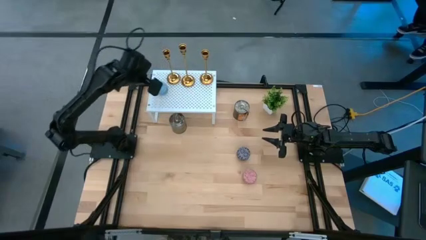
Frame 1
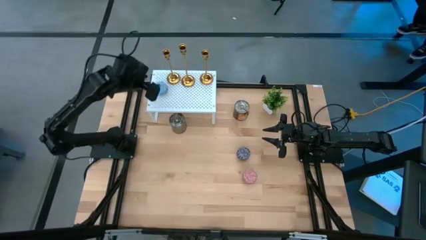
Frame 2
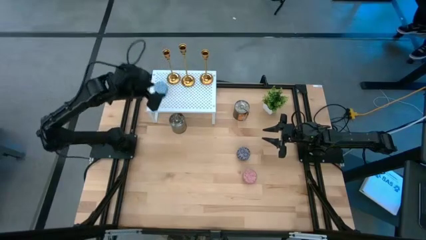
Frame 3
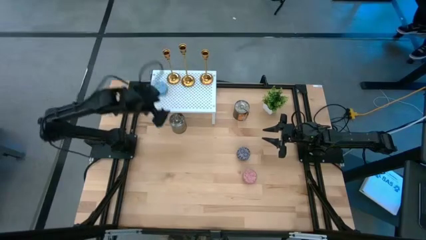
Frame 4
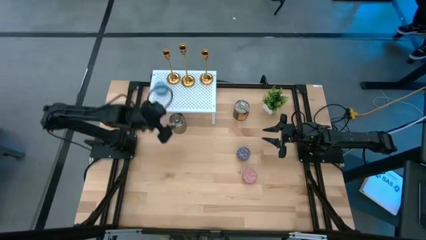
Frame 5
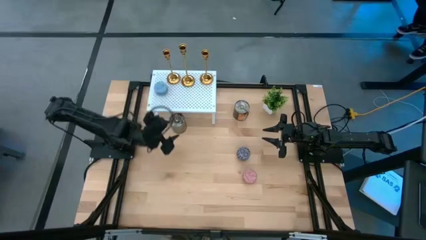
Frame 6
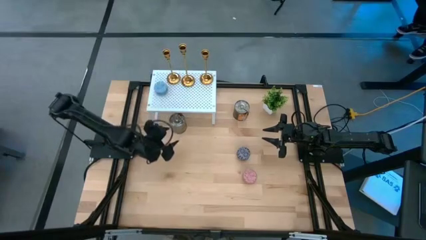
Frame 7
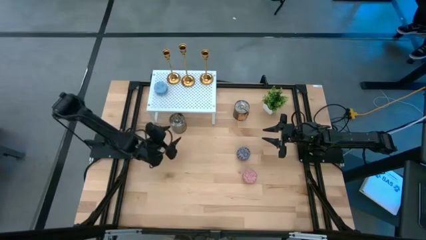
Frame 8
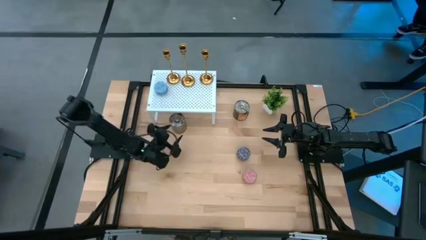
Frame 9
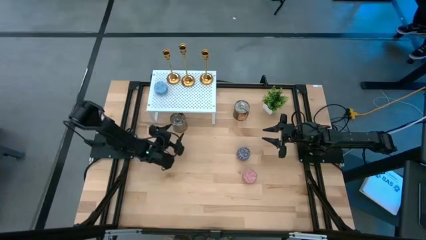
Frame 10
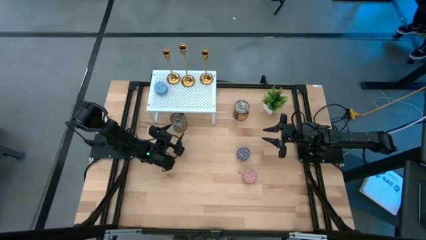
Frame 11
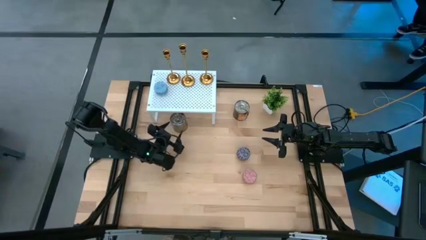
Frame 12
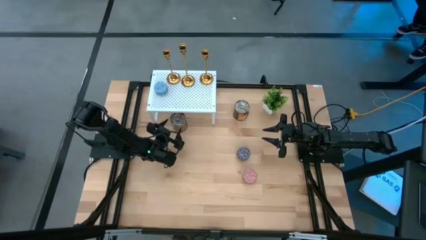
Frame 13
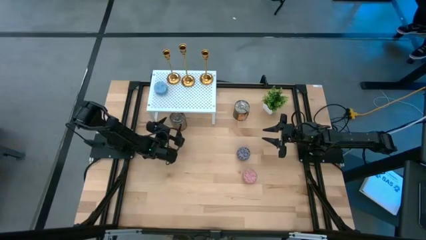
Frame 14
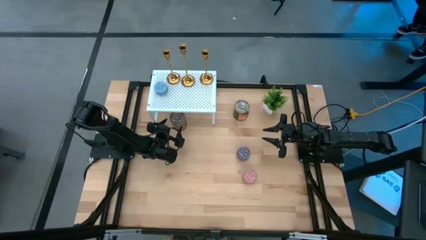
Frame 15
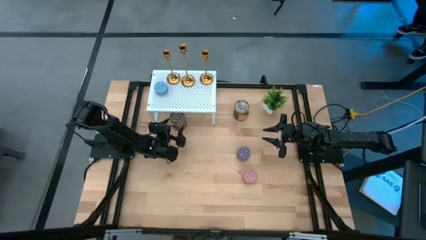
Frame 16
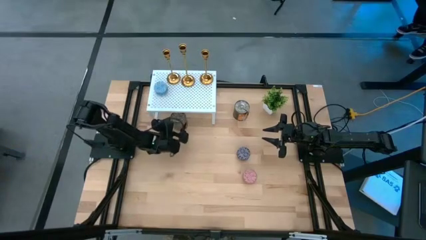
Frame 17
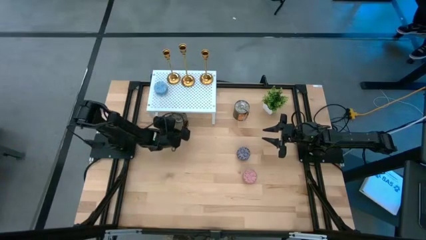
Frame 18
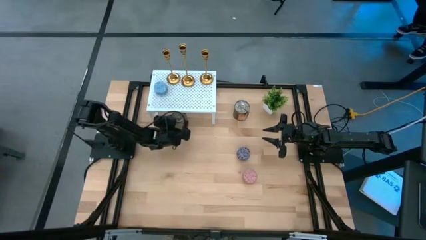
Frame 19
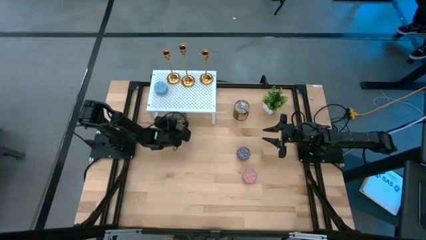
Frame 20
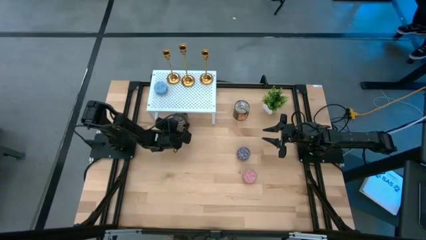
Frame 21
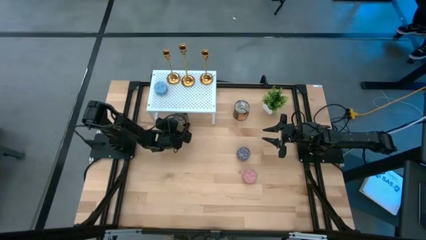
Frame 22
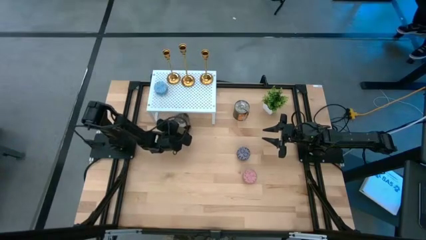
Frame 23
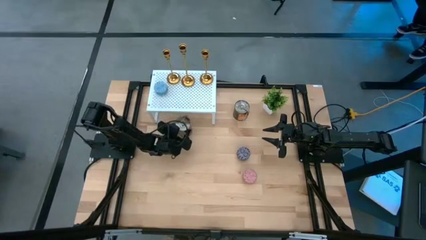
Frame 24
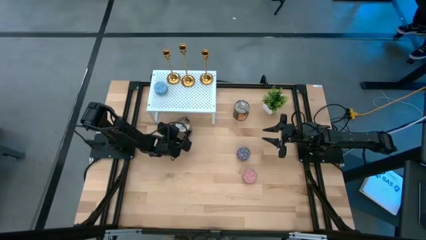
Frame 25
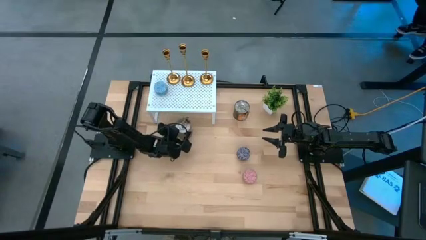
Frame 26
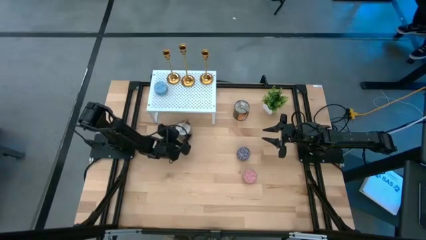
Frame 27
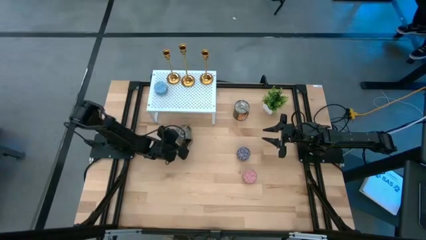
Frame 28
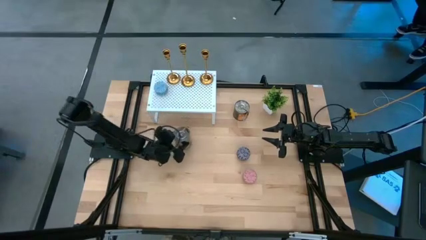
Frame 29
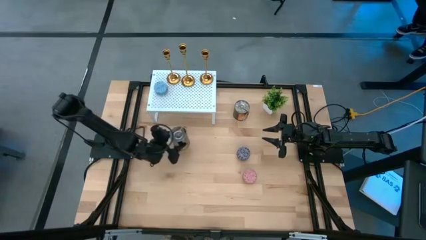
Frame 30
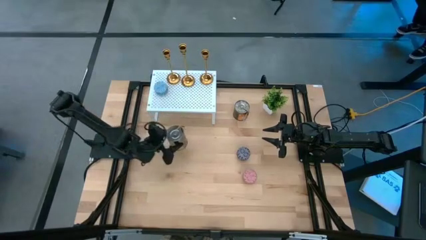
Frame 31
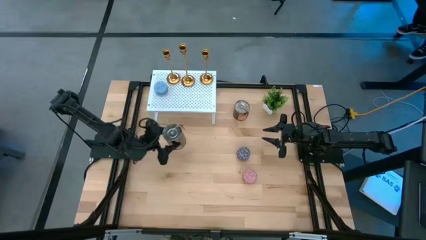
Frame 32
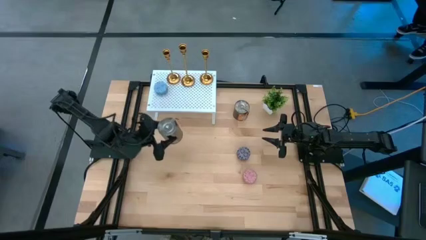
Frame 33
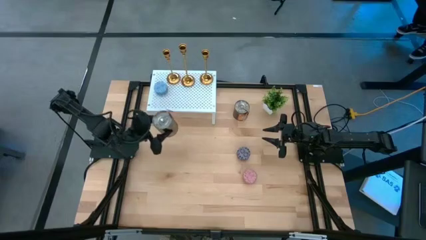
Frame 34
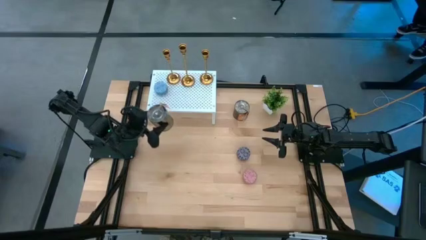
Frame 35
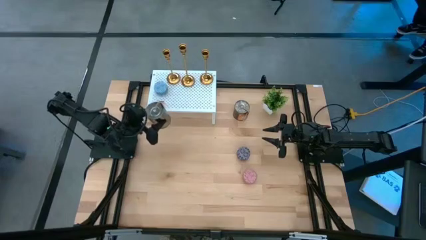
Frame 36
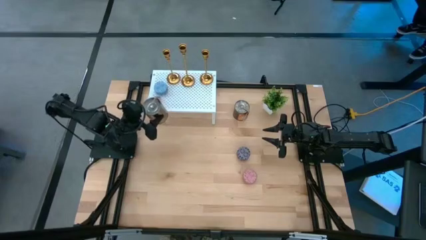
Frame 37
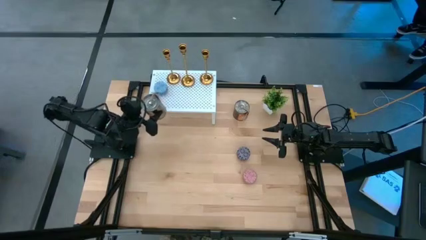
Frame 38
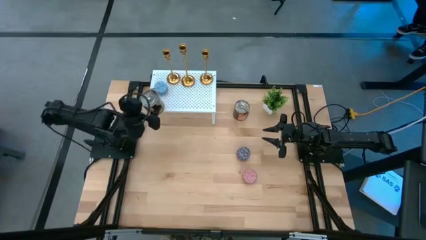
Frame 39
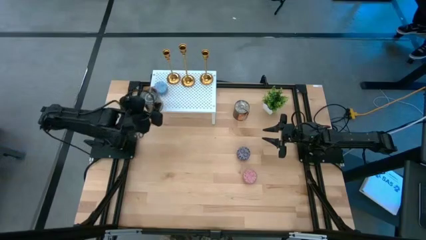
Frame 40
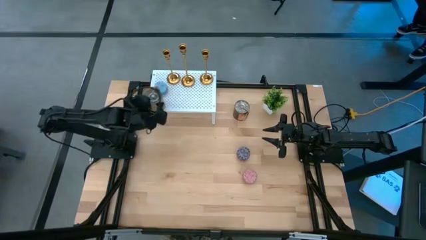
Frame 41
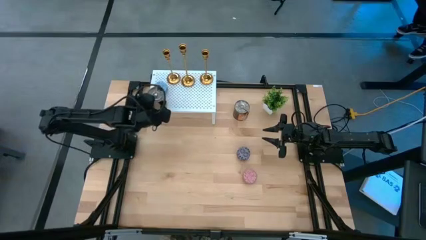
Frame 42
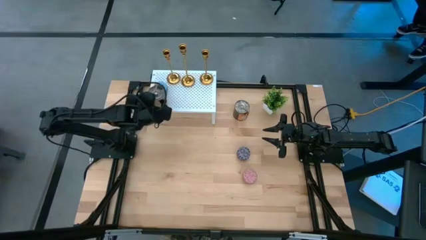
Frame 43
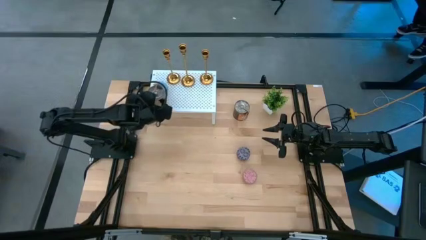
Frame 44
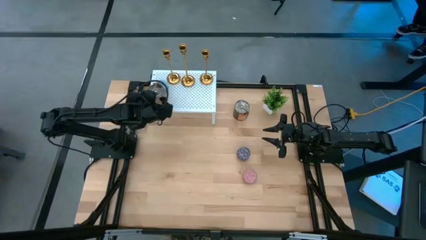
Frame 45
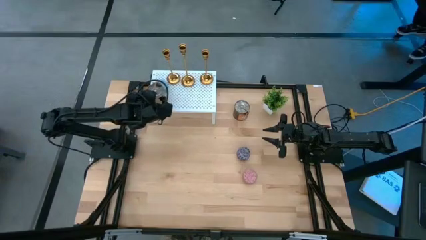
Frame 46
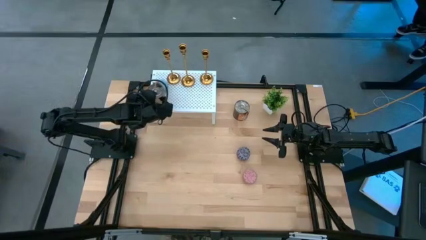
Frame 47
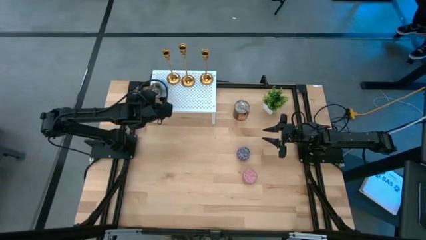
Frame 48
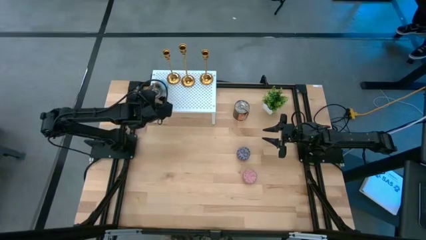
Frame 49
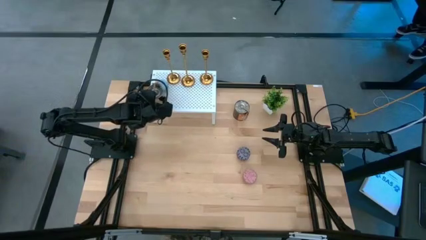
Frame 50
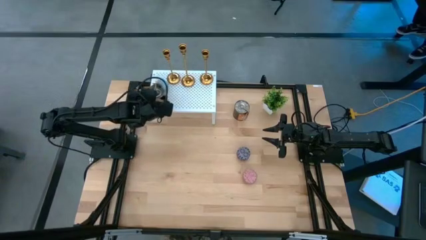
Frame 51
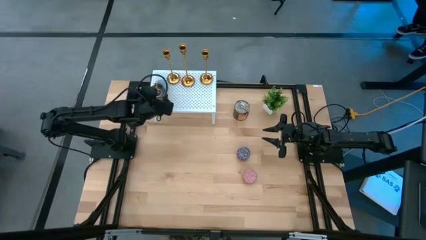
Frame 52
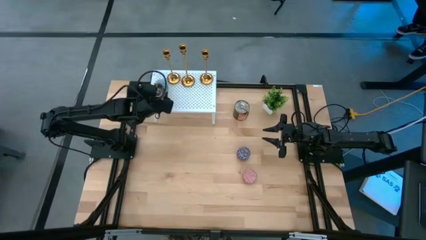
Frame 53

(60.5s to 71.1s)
Task: Pick & Place candle stick holders
Put the left candle tin on the shelf

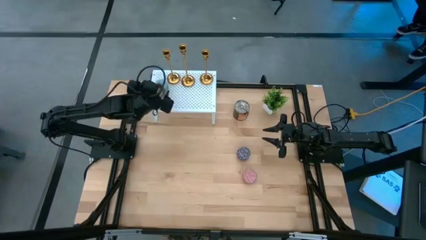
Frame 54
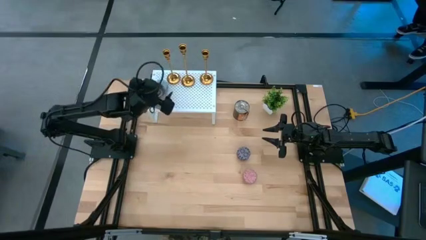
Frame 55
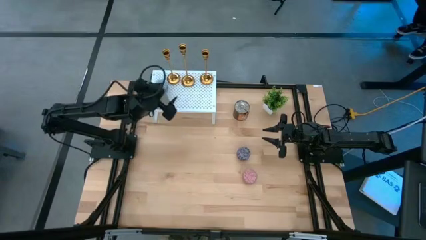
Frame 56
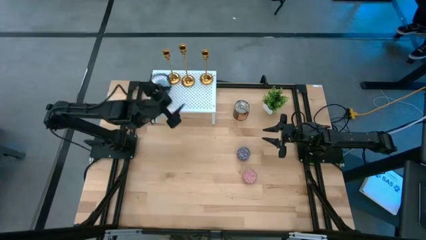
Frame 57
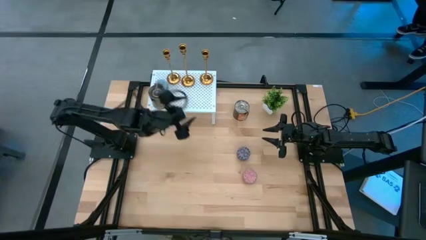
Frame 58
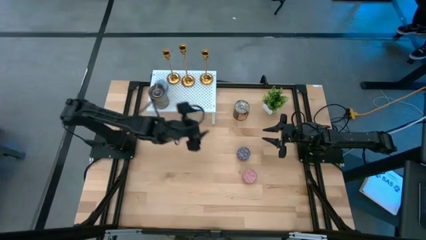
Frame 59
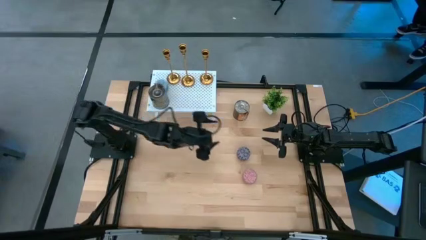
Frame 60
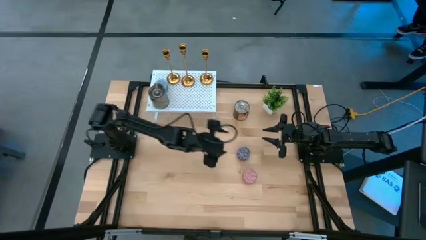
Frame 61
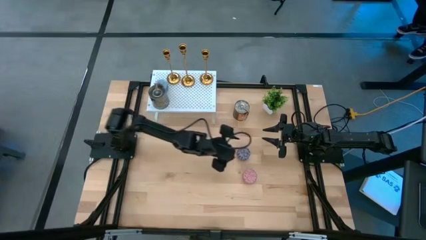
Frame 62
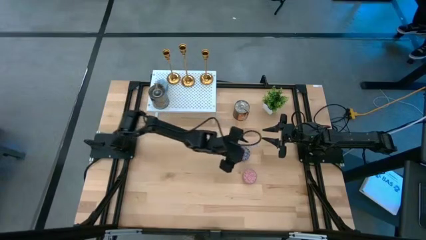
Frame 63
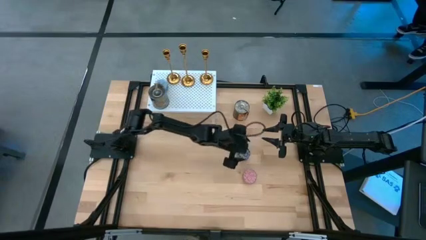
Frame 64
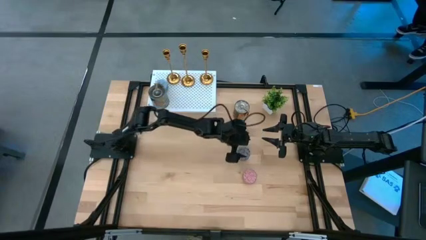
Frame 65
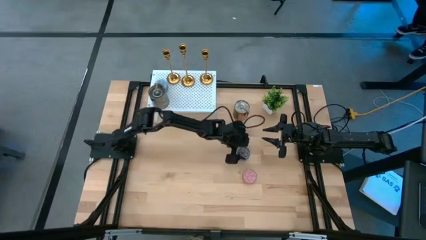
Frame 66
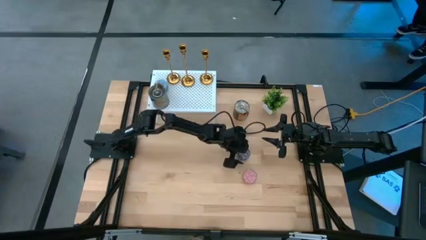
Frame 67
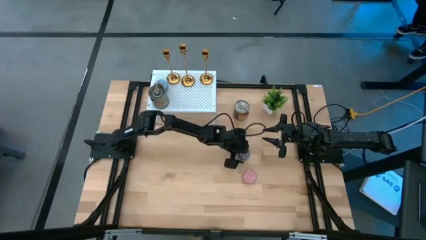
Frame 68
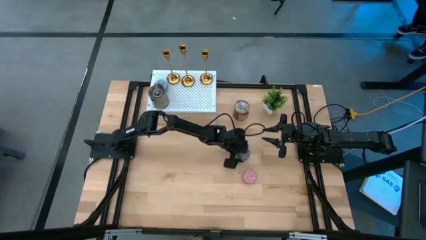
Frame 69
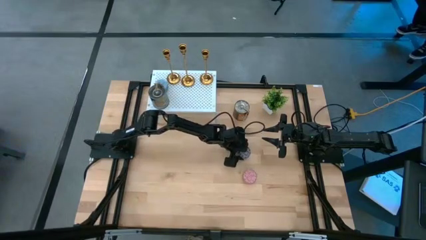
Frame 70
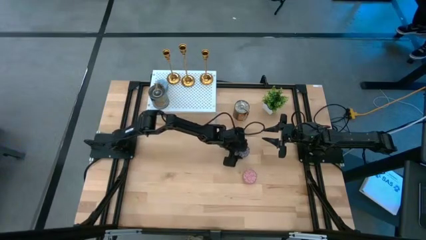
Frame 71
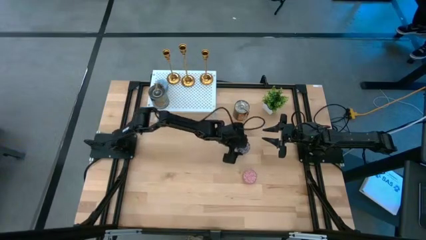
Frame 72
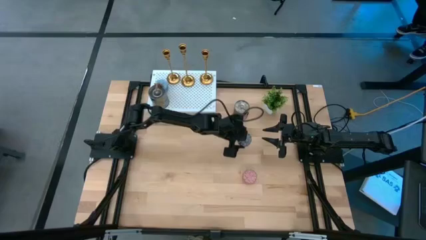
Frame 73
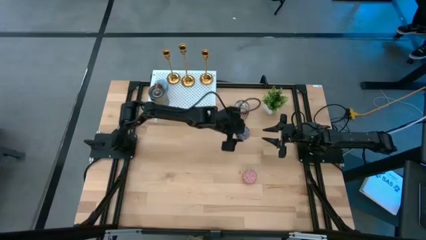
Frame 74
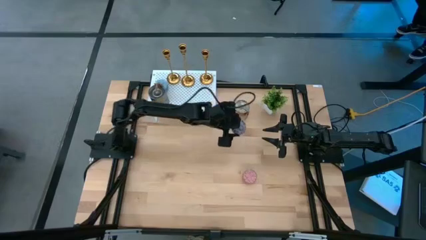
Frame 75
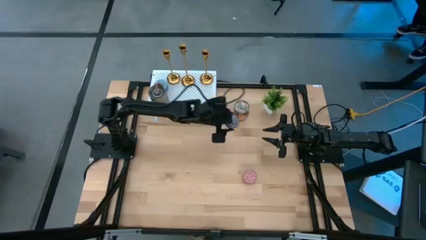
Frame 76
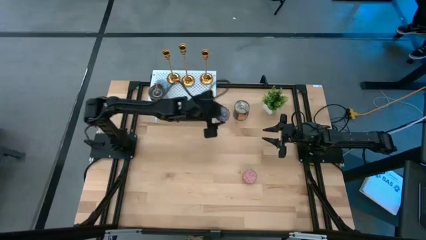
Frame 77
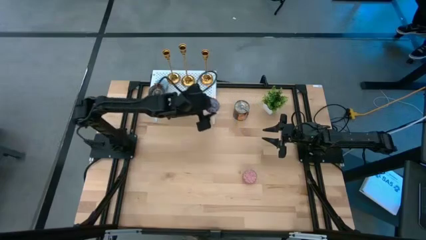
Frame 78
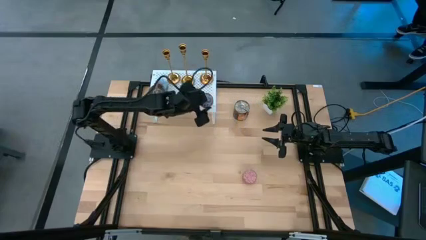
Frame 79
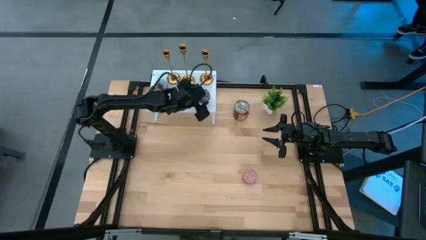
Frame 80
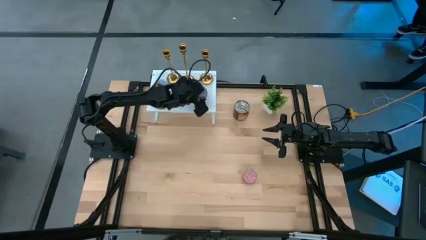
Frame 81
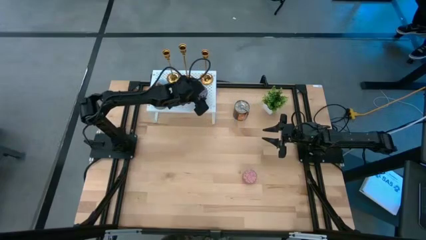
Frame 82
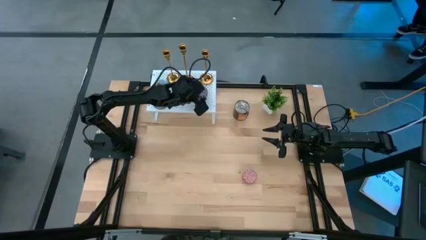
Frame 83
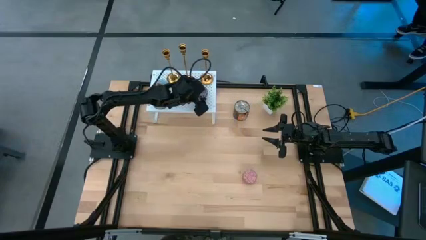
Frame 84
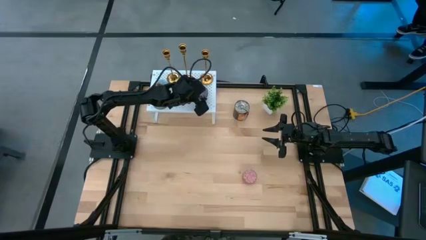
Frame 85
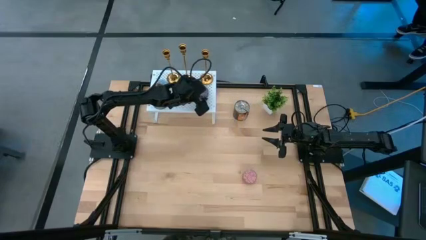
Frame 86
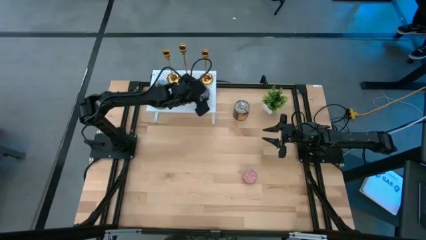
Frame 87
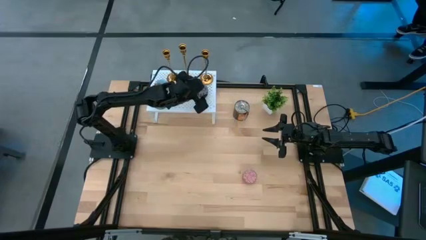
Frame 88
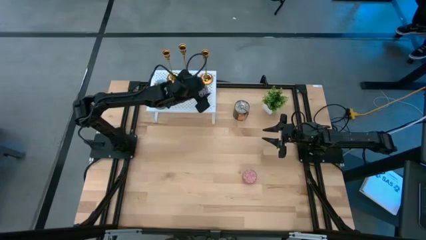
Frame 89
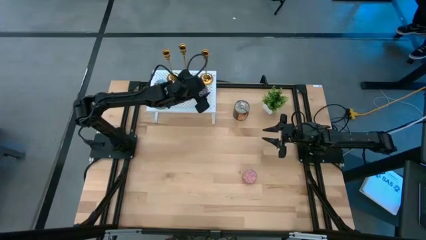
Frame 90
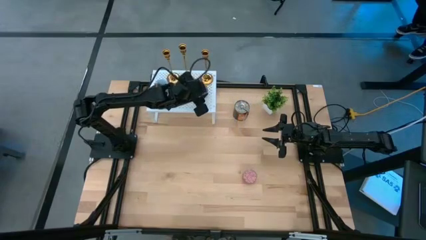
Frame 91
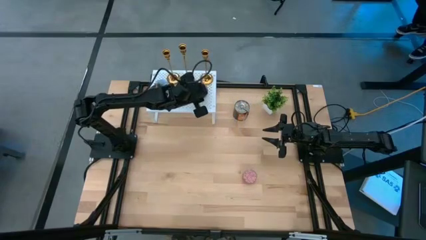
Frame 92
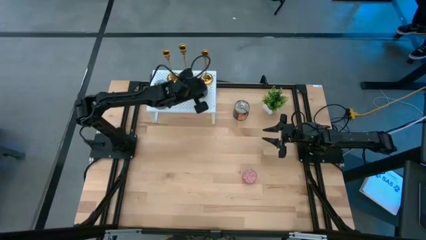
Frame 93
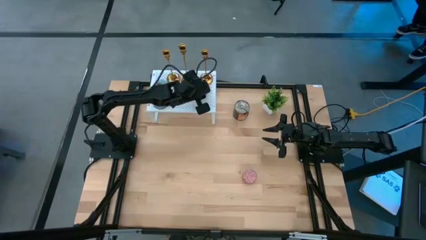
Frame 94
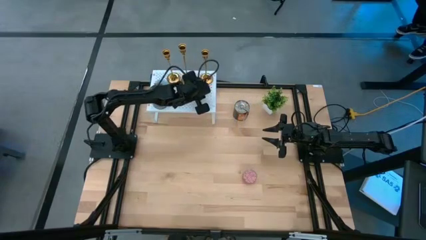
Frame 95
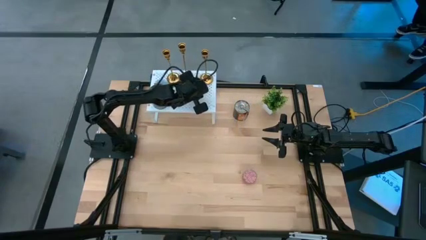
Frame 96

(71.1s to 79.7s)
Put the red patterned candle on the shelf
